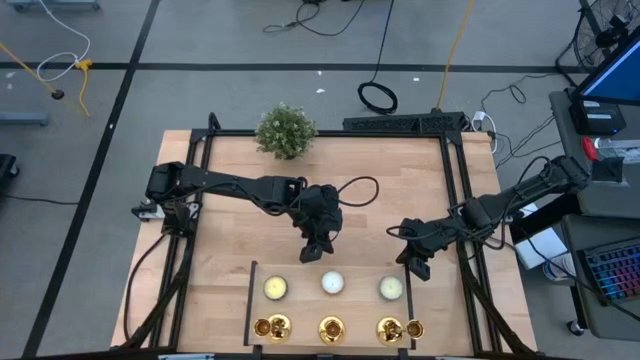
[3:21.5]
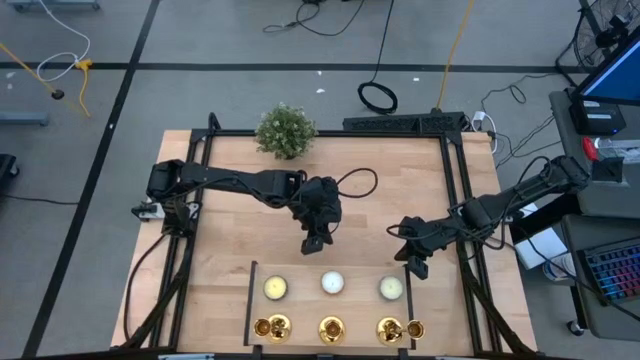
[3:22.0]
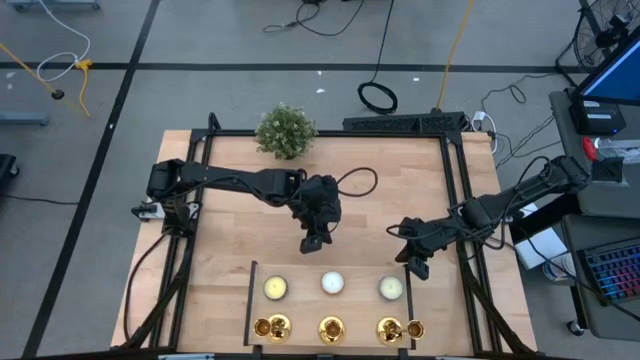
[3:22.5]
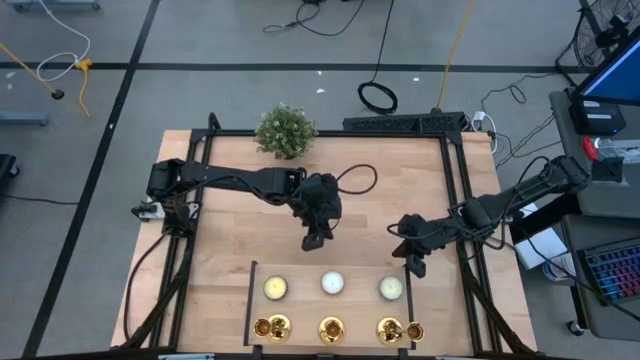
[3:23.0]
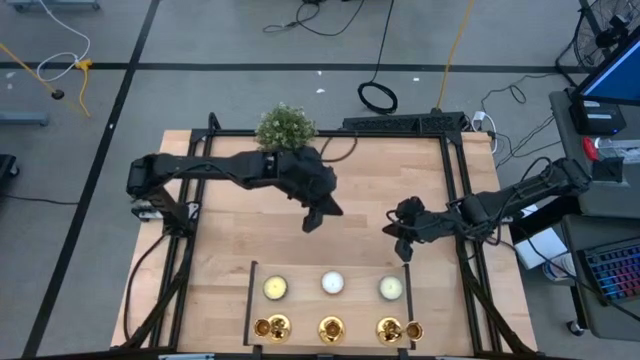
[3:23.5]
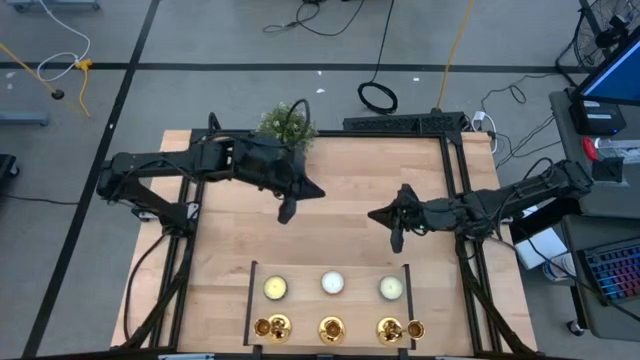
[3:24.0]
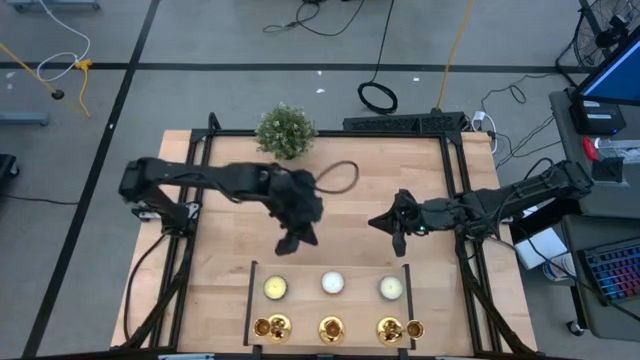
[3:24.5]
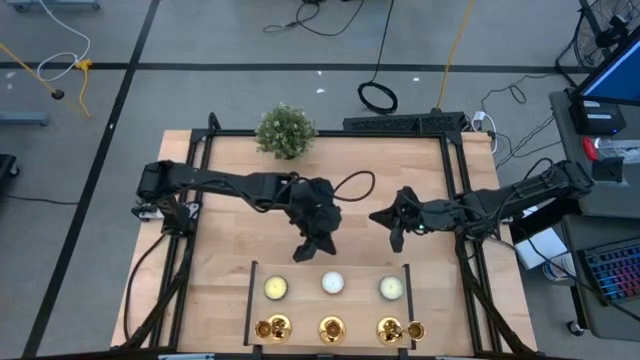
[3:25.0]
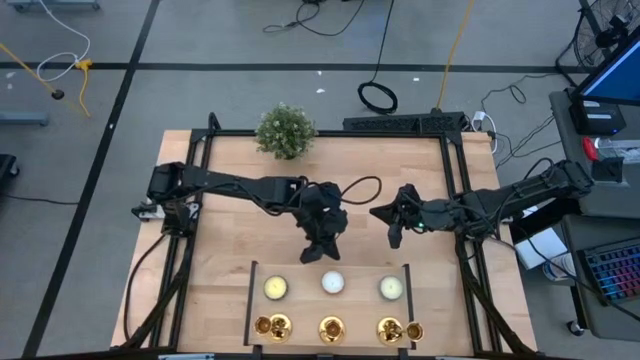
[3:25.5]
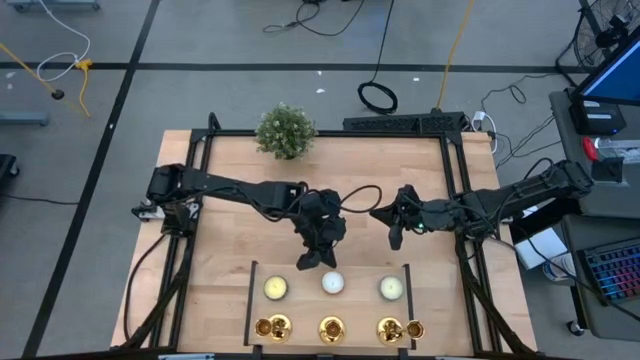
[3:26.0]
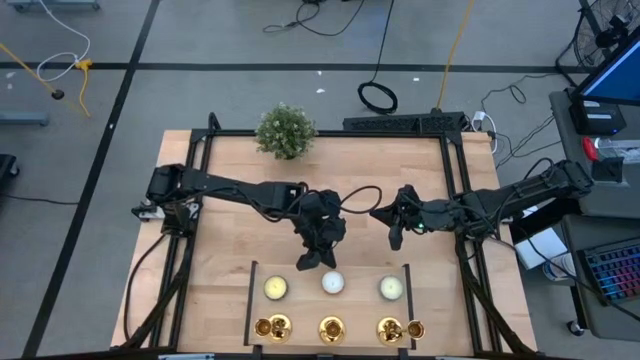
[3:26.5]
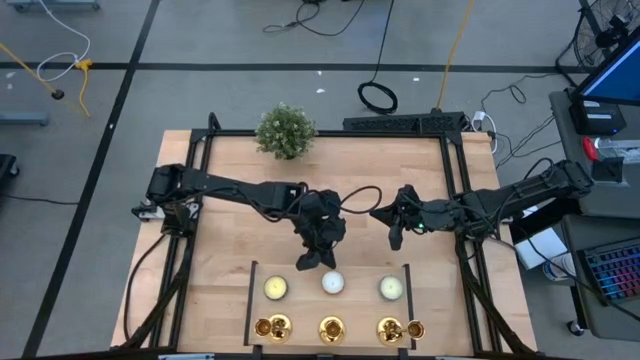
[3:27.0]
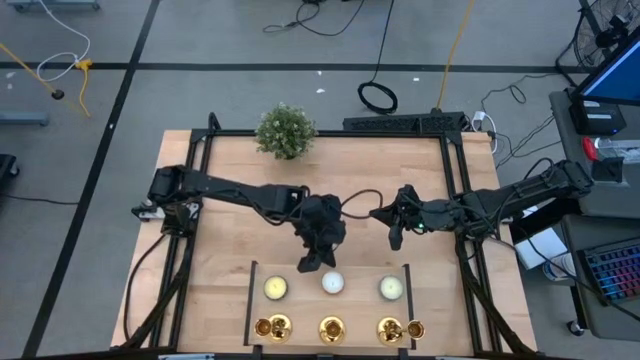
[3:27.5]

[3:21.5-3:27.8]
Task: Pick & Place candle stick holders
Adjust the yellow patterned scented candle on the shelf

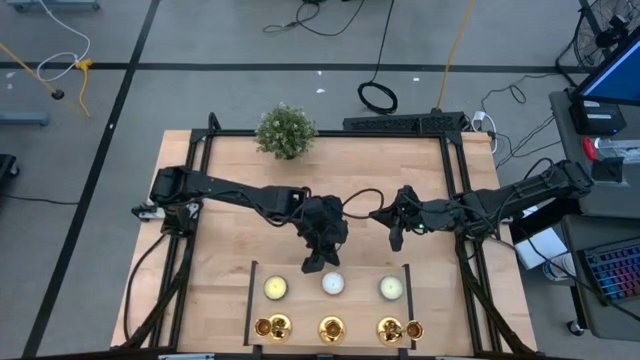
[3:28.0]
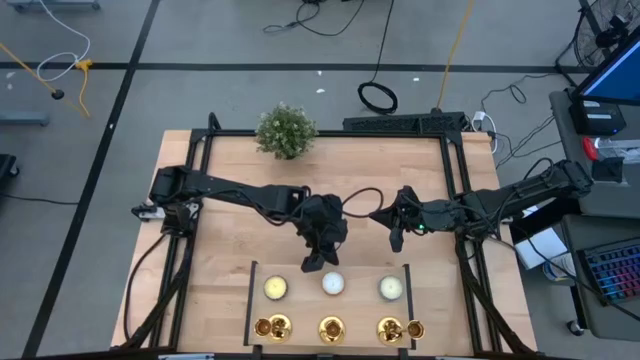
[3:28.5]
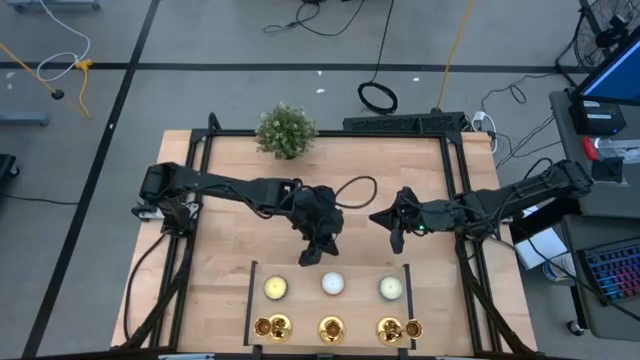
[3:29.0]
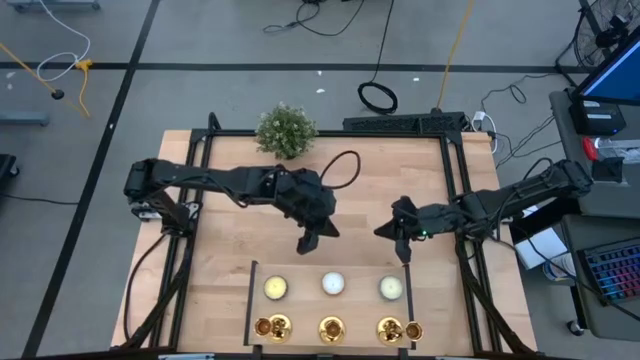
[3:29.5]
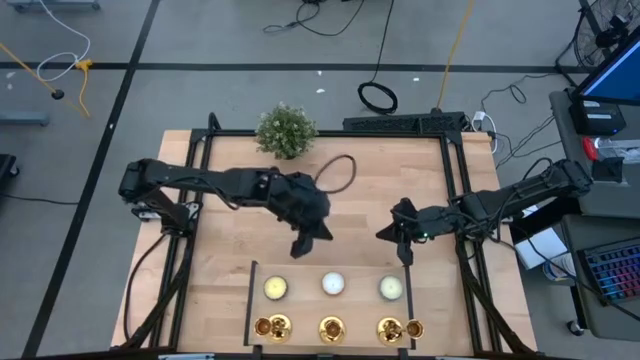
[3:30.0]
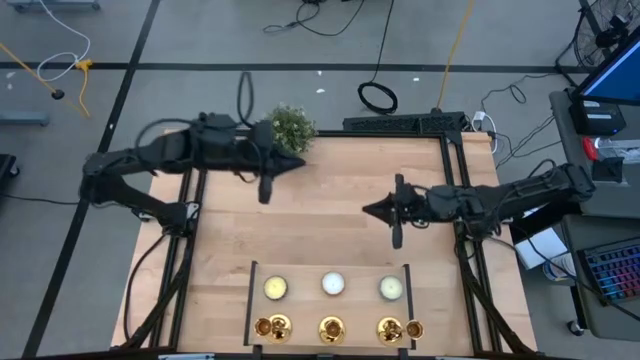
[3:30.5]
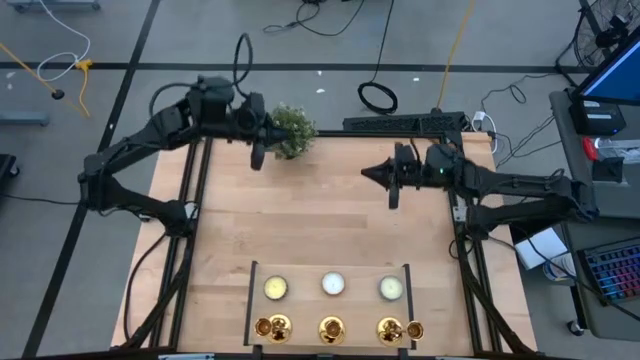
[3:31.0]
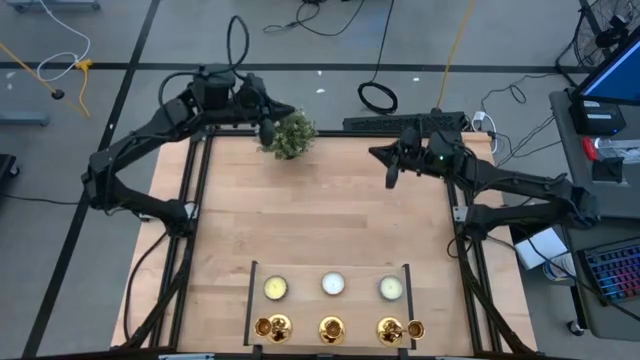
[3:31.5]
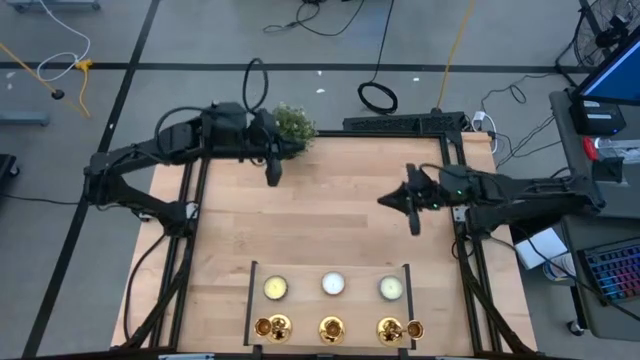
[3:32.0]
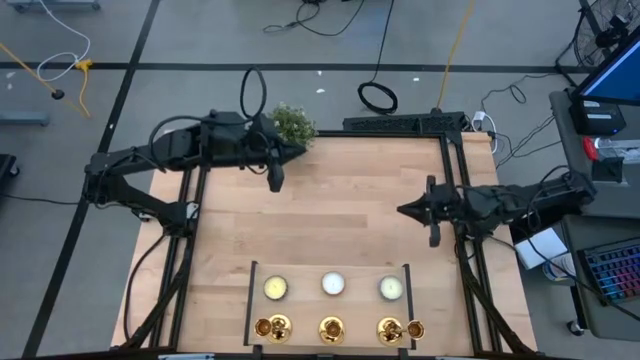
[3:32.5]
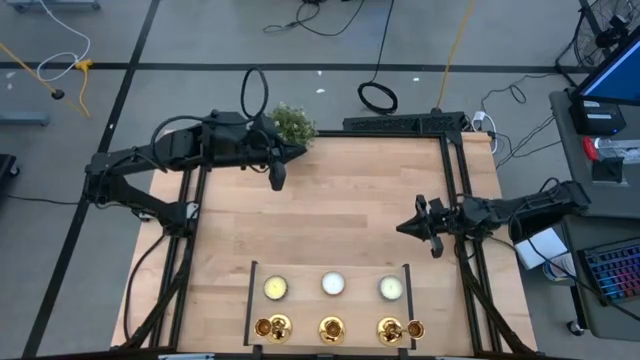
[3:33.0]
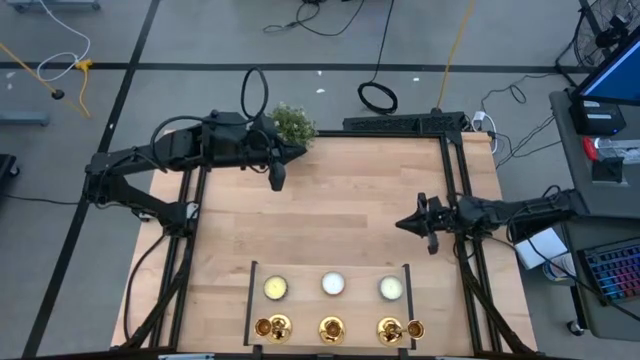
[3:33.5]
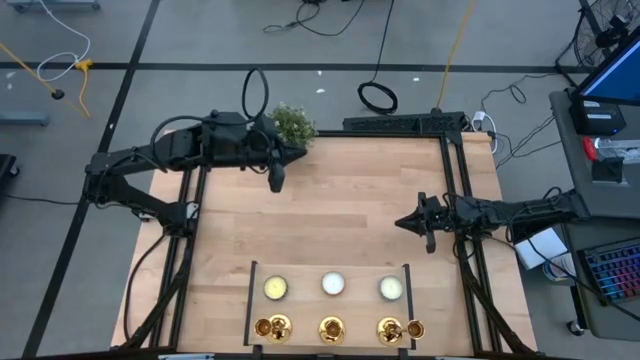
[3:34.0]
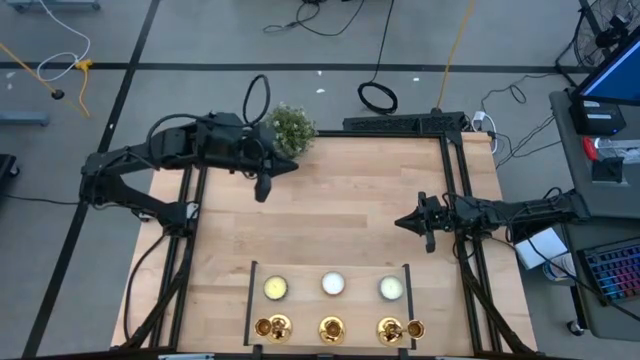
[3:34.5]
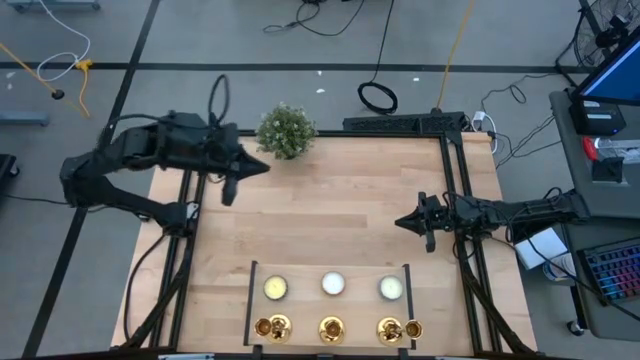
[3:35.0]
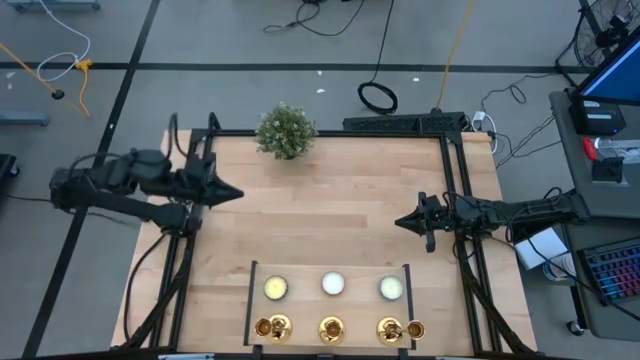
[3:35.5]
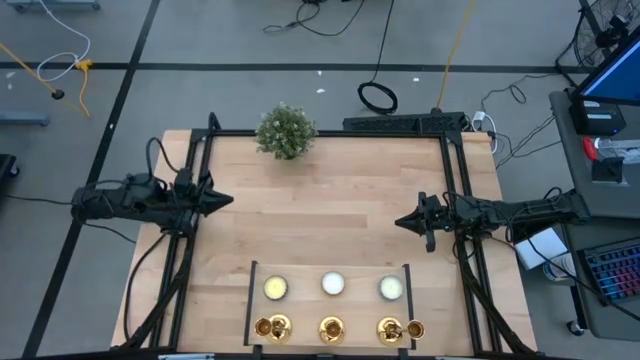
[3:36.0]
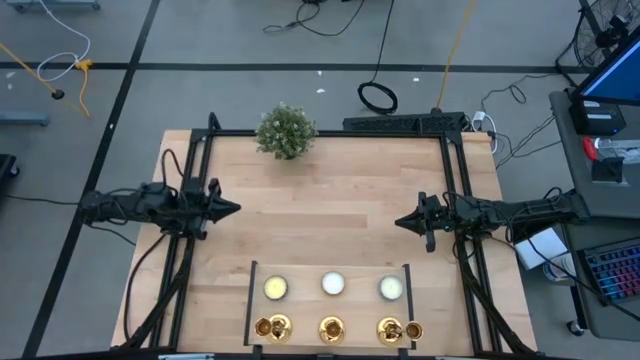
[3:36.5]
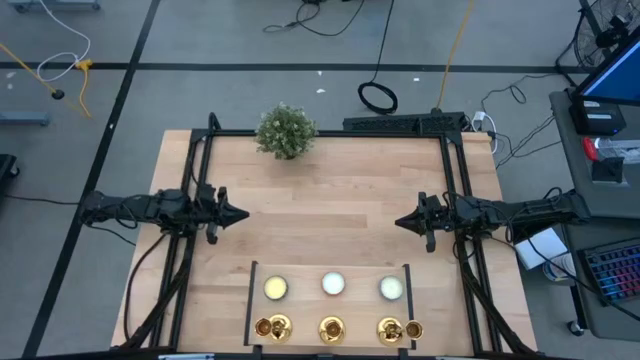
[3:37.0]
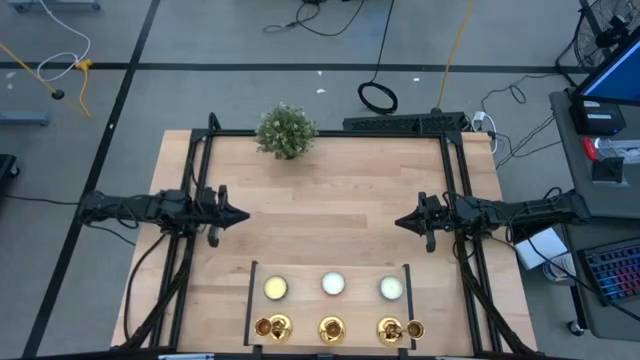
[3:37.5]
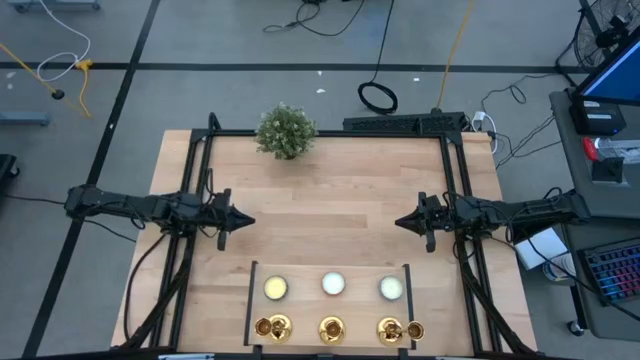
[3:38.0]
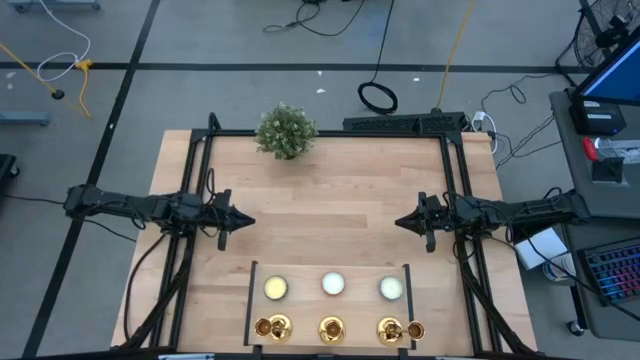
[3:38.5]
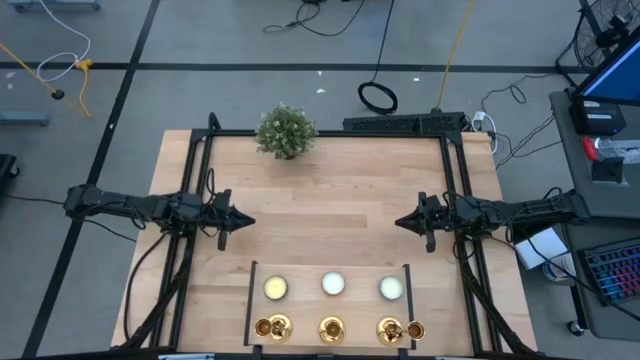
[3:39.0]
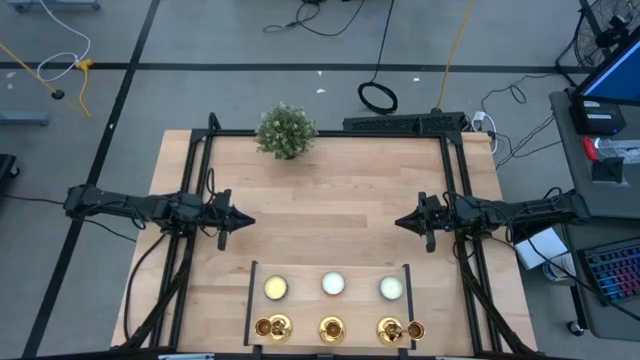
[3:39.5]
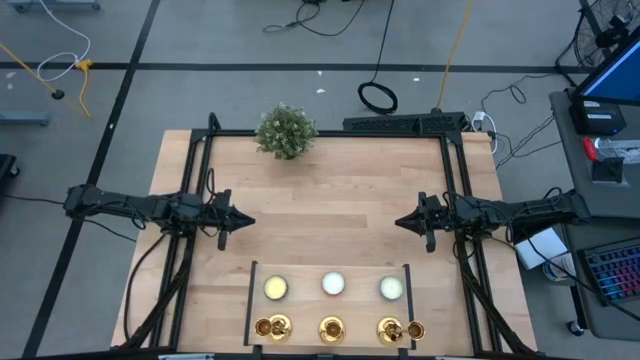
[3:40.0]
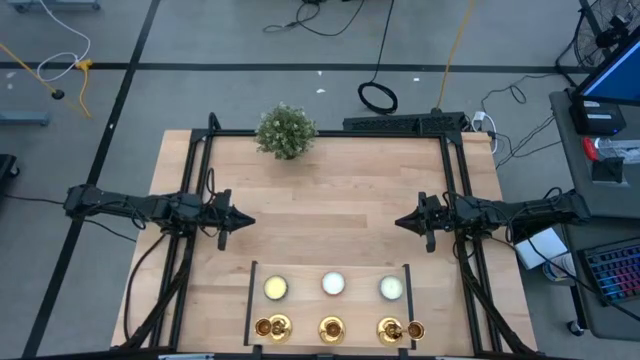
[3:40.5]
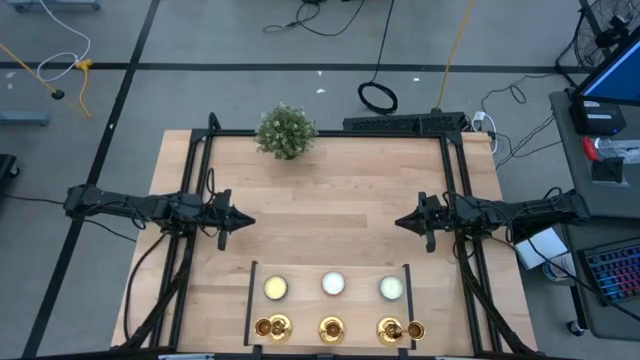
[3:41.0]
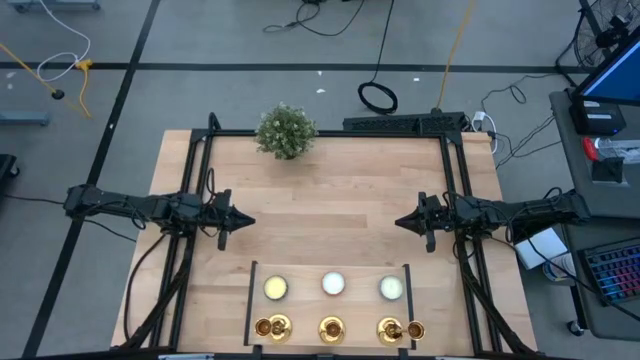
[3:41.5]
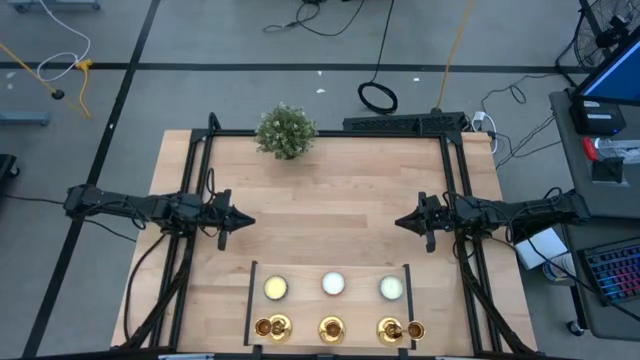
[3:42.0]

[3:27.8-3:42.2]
Return to Home Position
